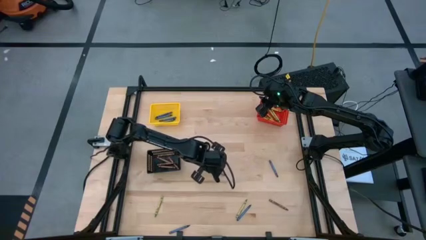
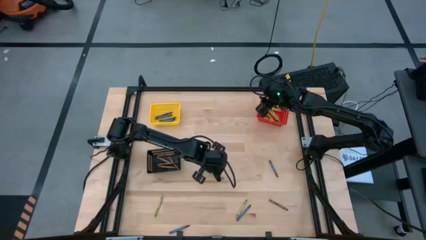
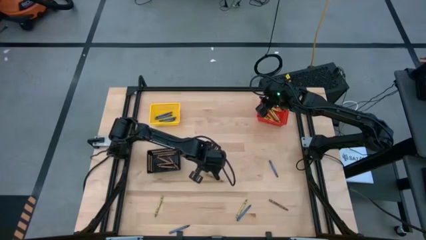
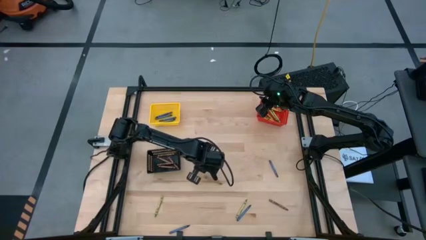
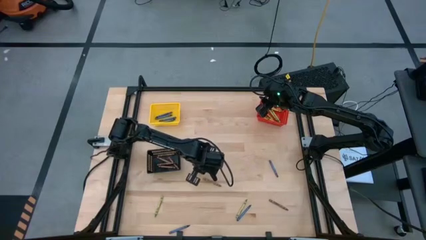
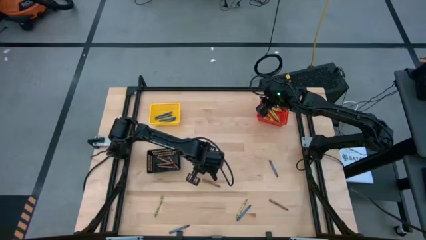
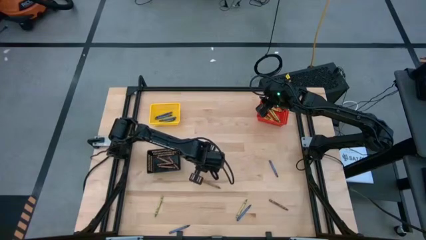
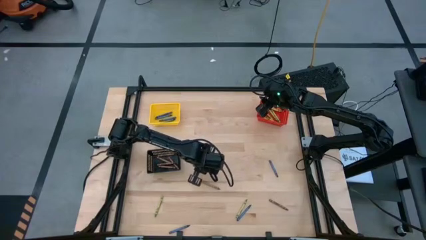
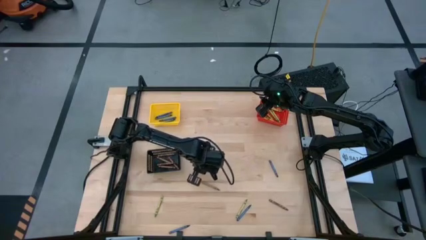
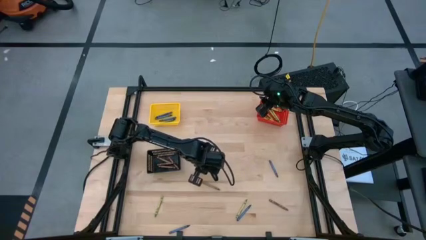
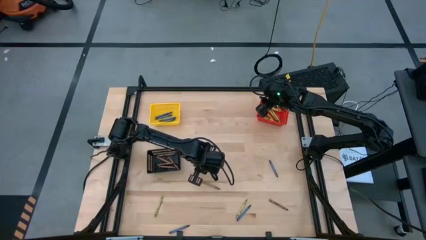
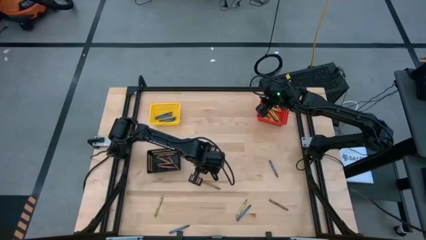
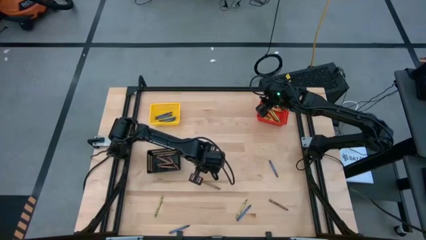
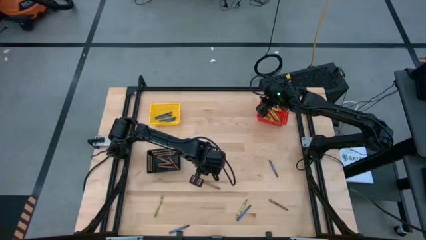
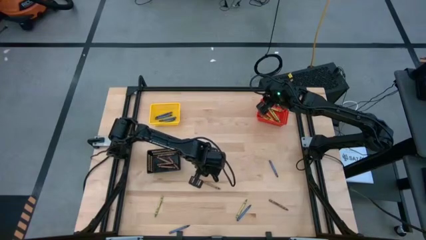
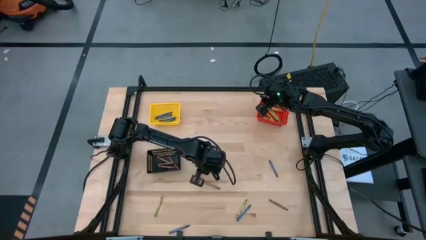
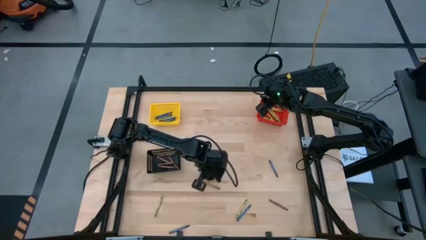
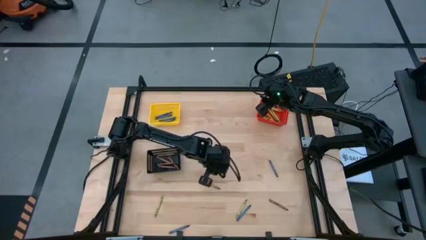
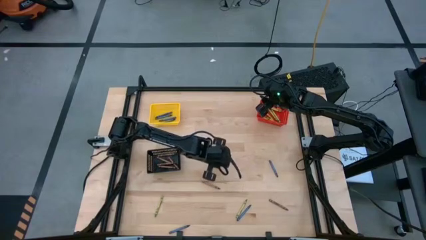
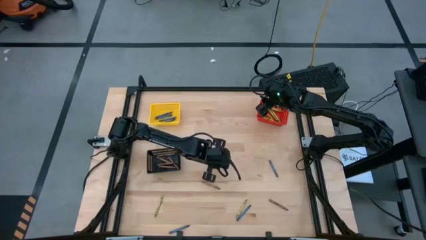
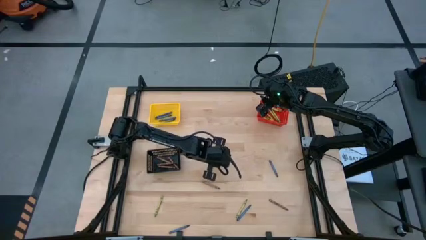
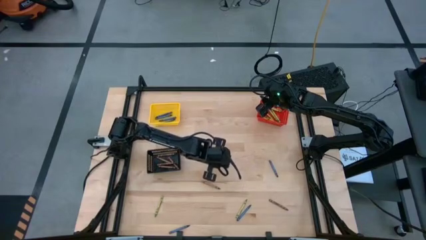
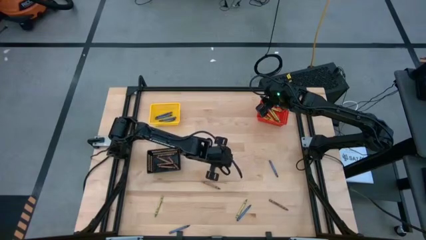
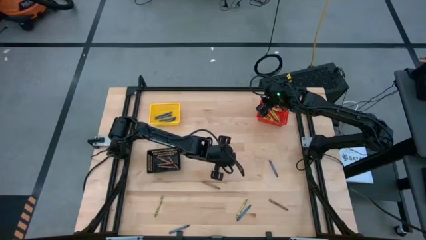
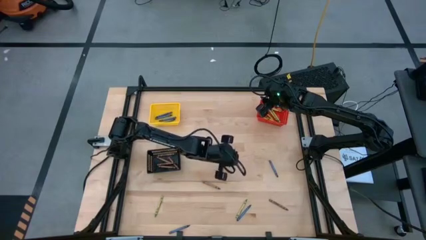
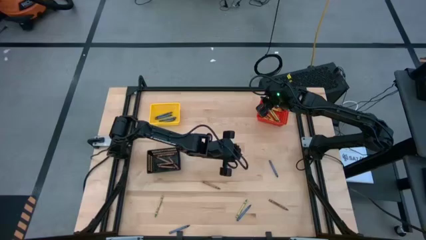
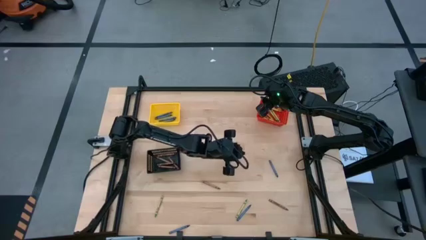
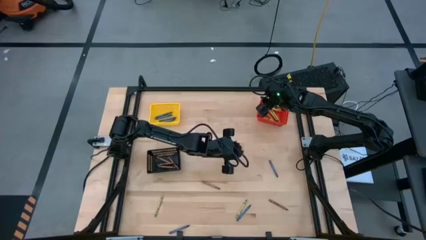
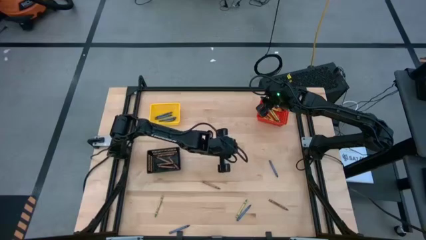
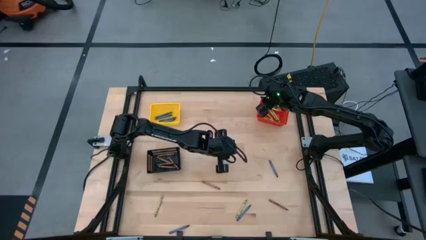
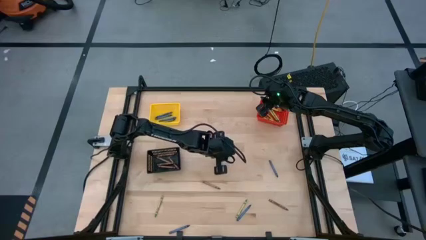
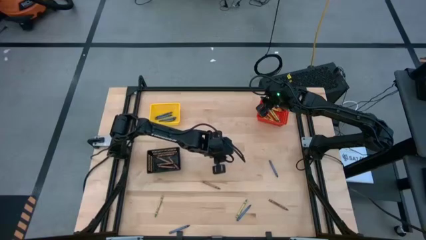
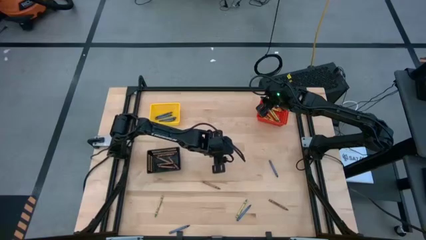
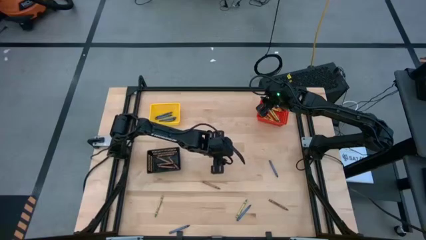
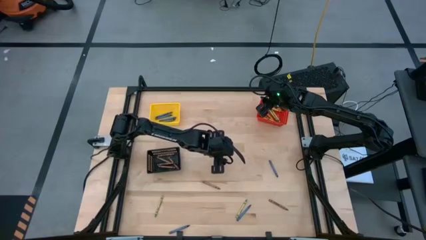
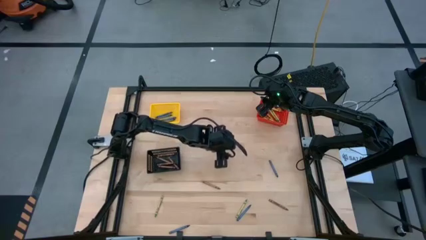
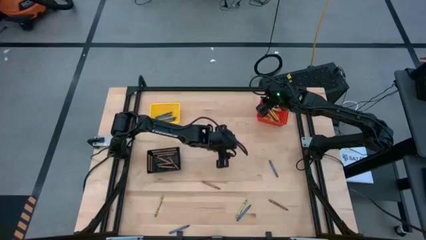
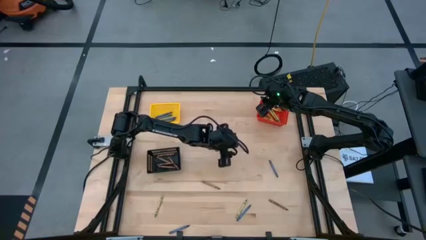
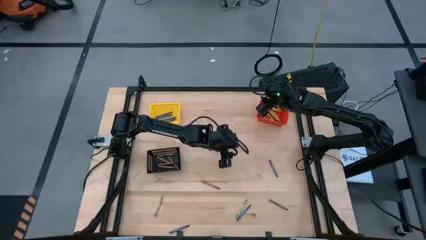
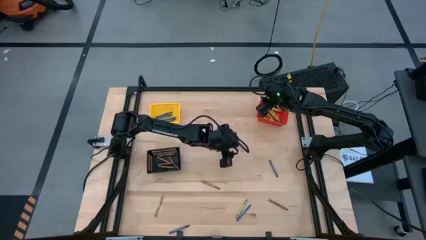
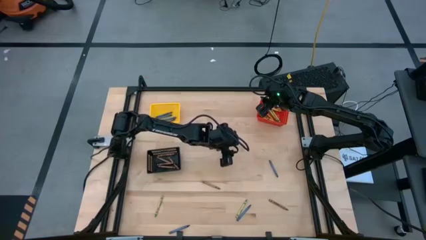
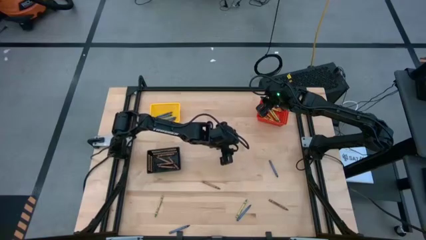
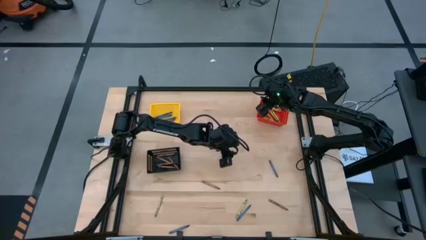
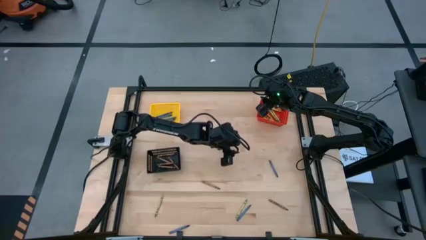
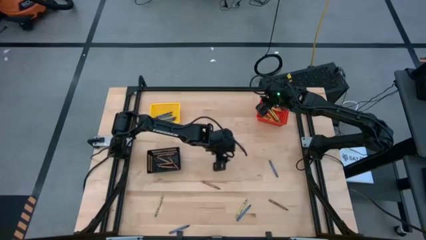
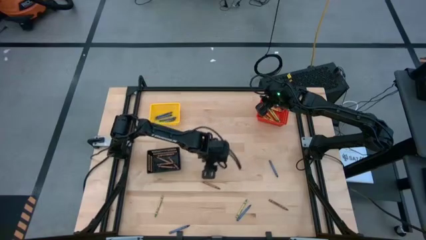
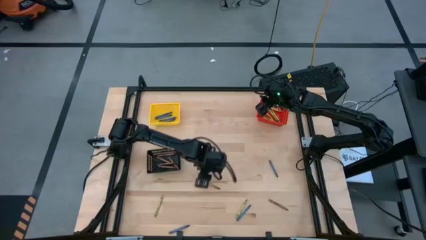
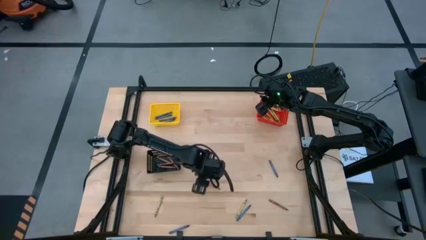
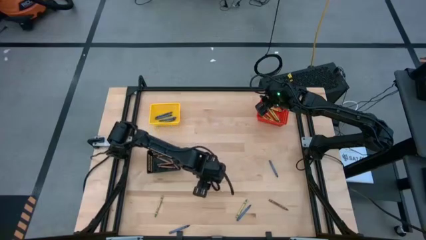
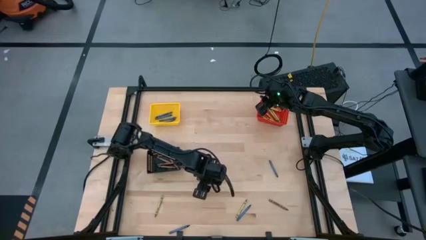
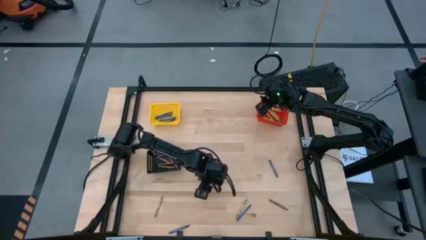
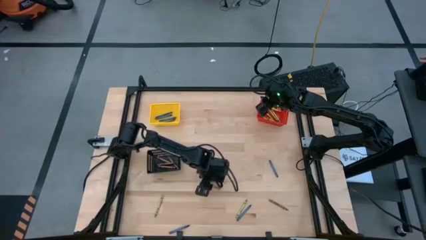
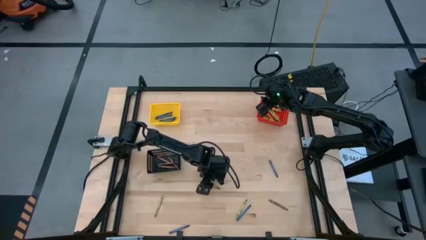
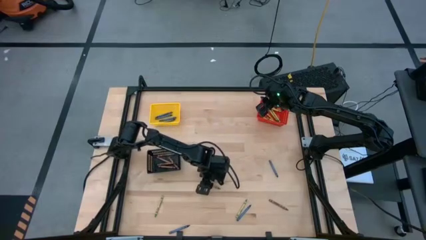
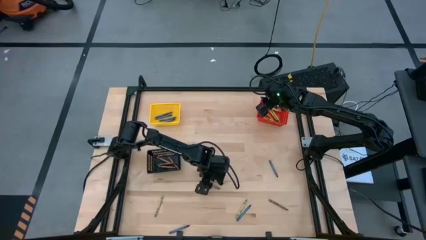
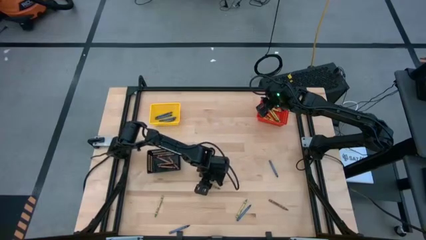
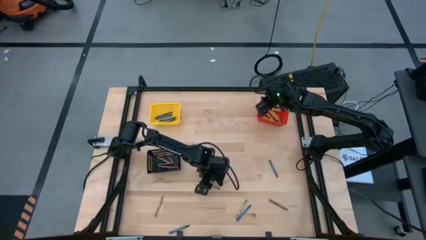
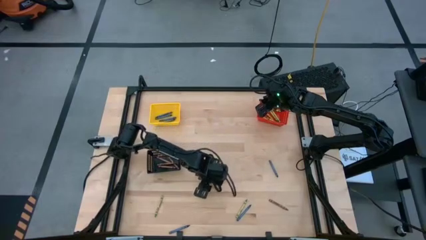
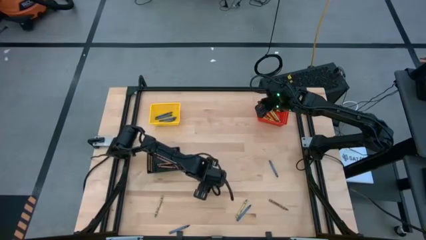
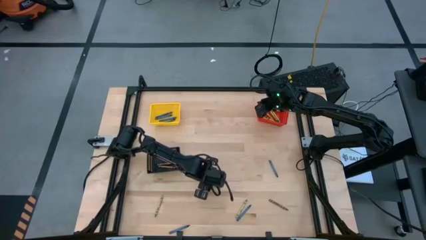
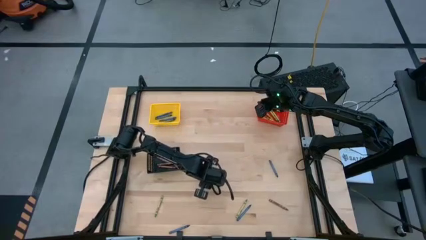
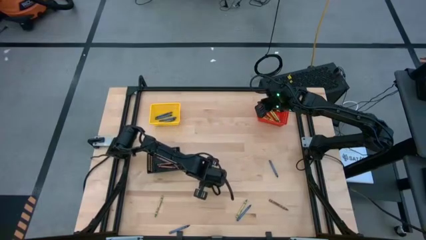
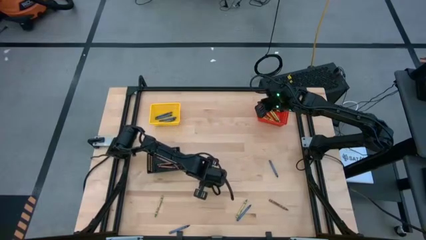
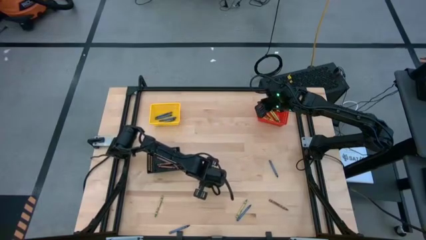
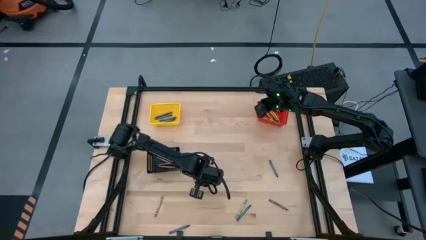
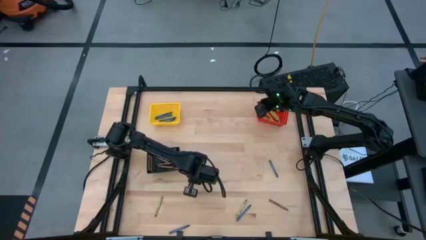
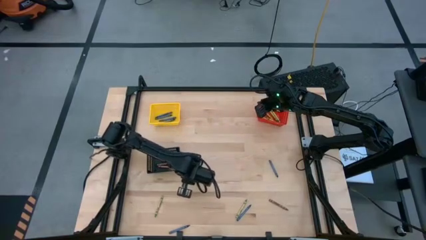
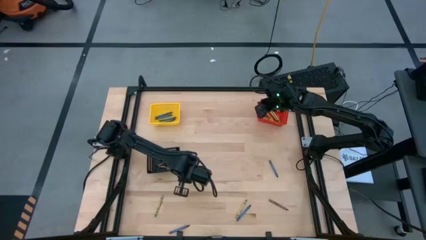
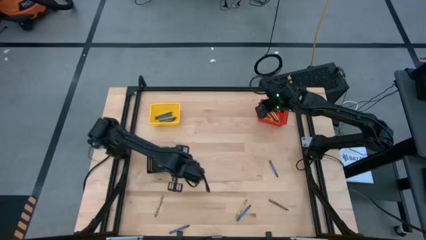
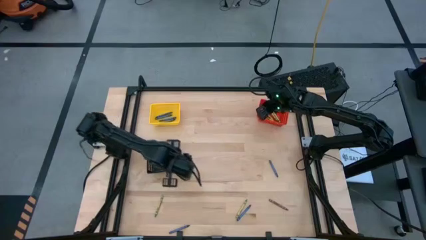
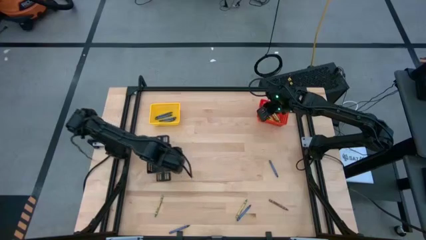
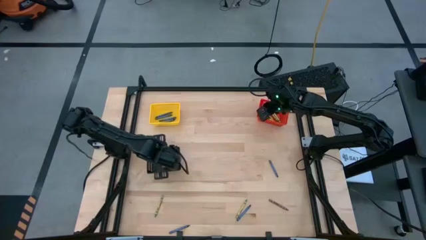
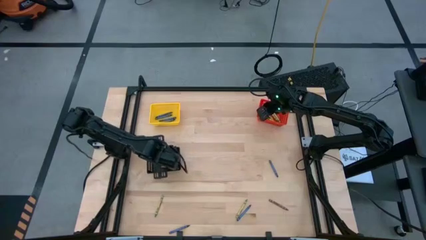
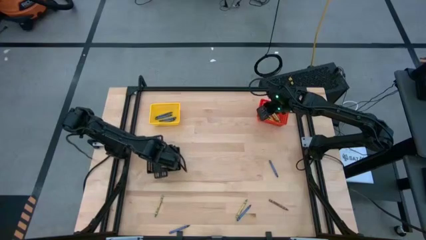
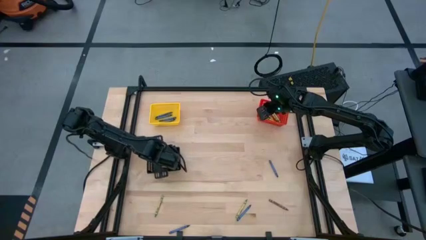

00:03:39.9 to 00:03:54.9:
Task: Sort crayons
Put the brown crayon into the black bin
